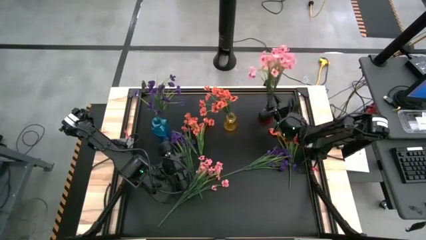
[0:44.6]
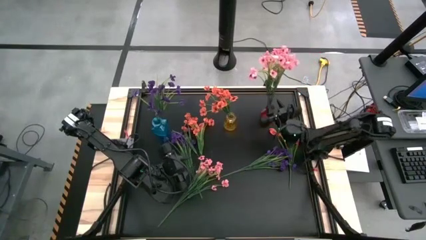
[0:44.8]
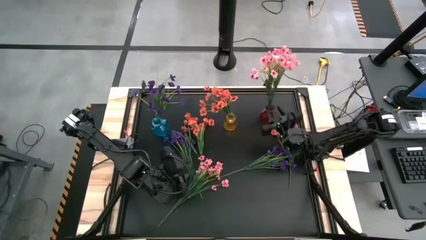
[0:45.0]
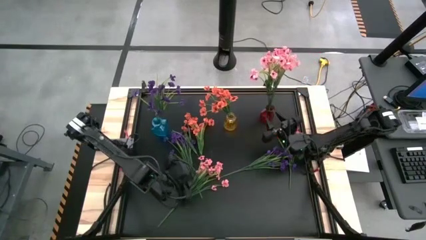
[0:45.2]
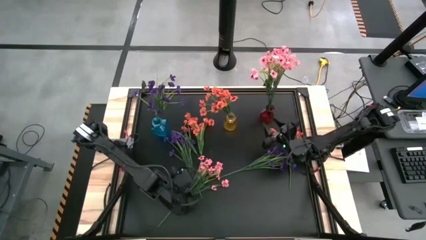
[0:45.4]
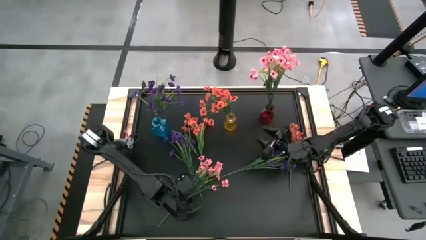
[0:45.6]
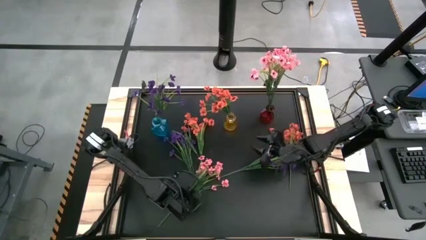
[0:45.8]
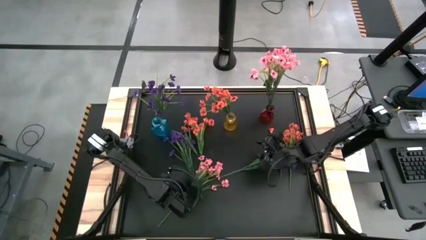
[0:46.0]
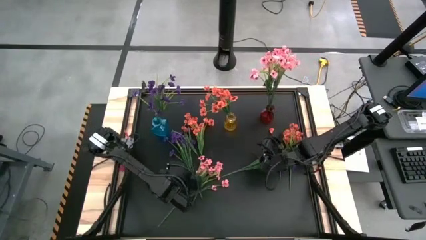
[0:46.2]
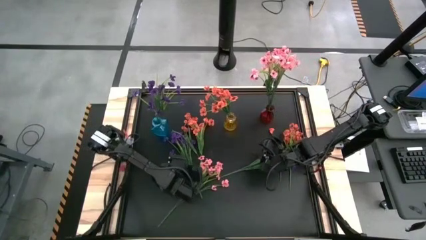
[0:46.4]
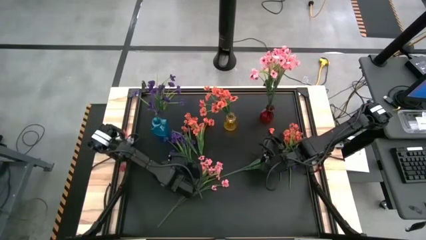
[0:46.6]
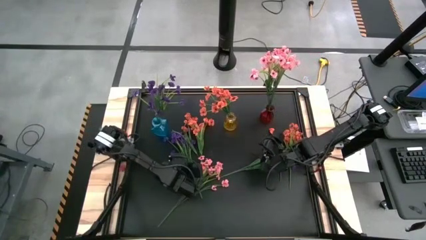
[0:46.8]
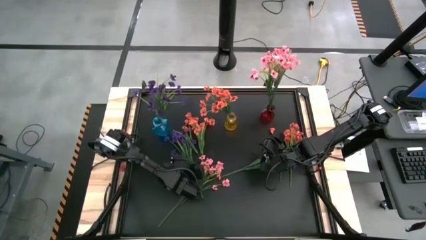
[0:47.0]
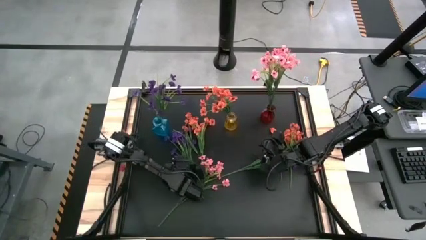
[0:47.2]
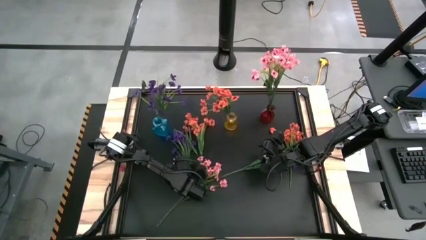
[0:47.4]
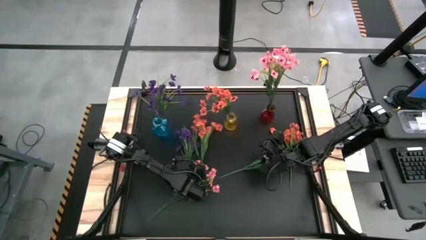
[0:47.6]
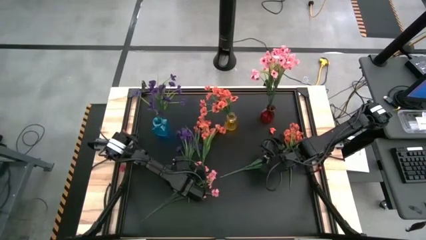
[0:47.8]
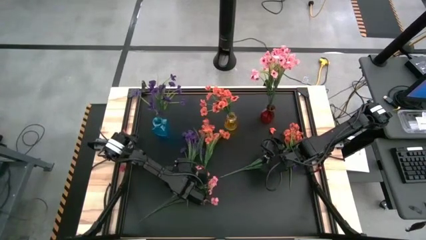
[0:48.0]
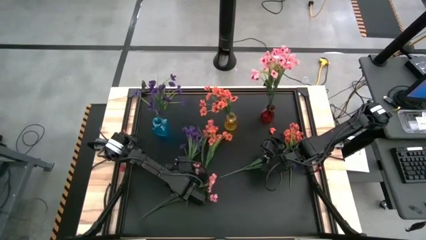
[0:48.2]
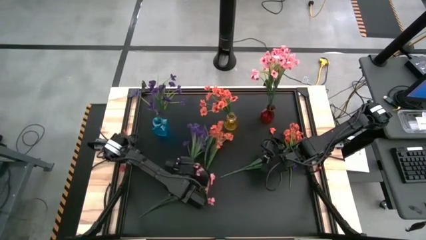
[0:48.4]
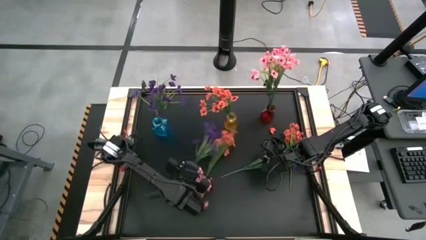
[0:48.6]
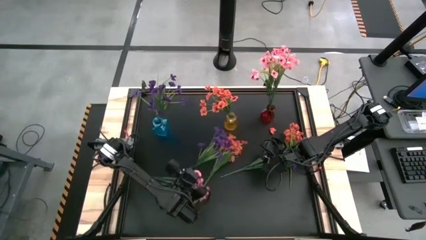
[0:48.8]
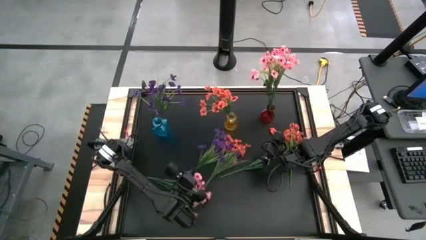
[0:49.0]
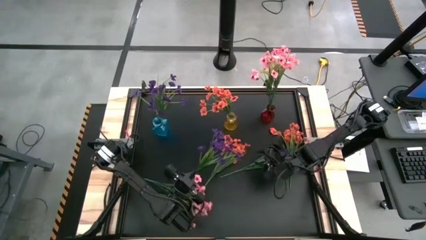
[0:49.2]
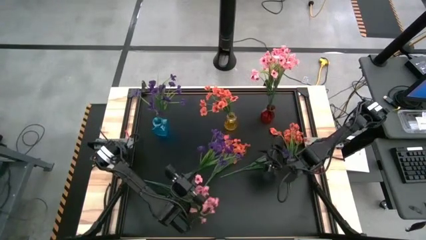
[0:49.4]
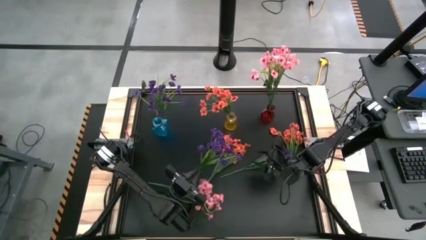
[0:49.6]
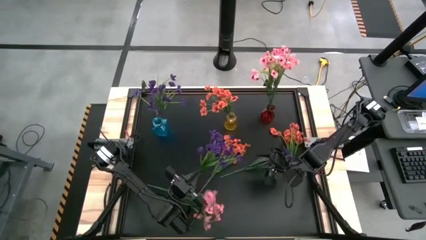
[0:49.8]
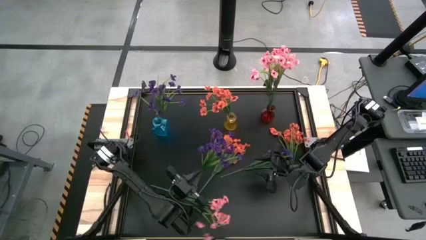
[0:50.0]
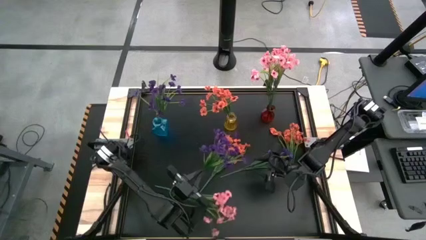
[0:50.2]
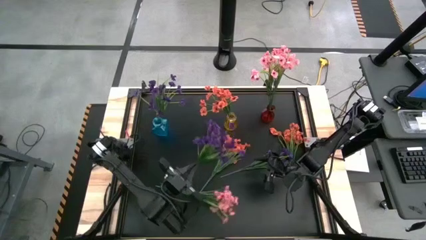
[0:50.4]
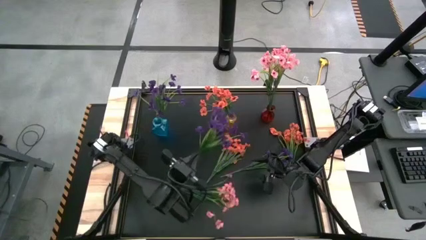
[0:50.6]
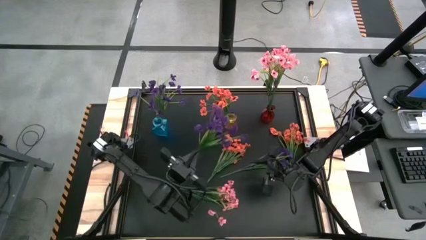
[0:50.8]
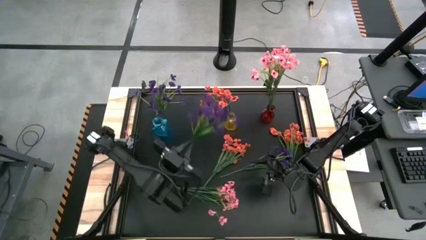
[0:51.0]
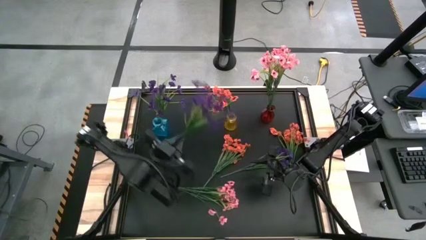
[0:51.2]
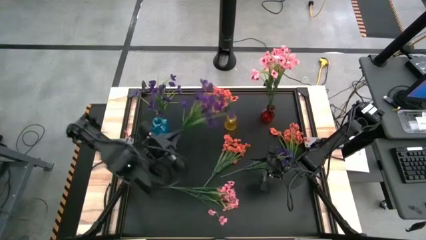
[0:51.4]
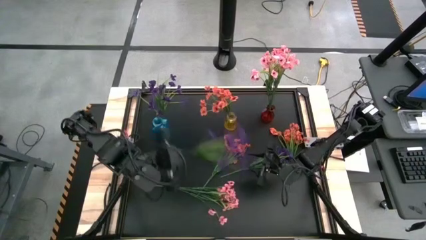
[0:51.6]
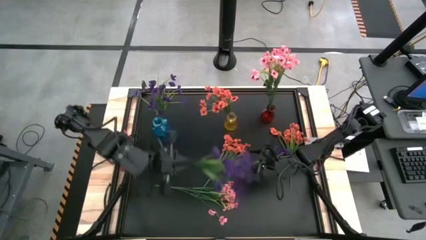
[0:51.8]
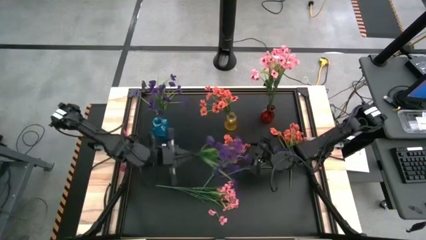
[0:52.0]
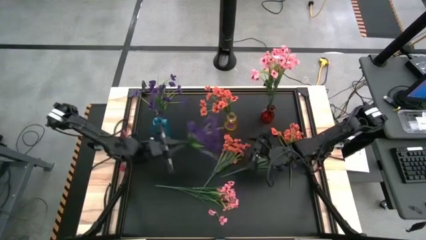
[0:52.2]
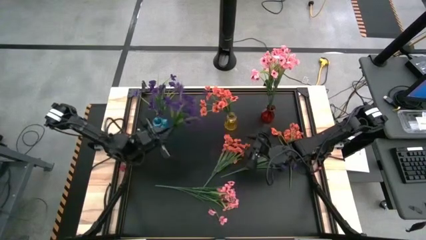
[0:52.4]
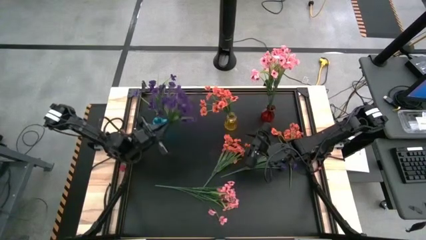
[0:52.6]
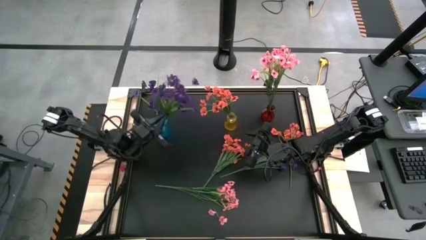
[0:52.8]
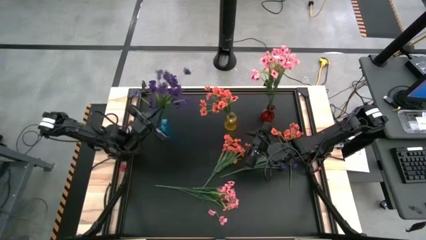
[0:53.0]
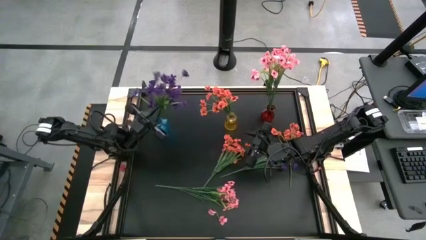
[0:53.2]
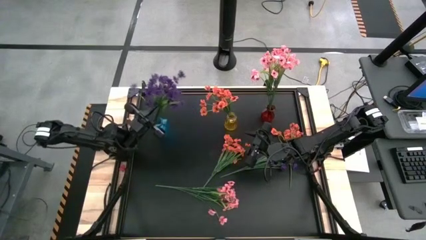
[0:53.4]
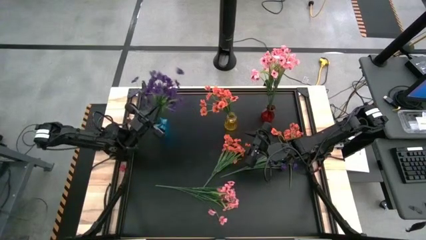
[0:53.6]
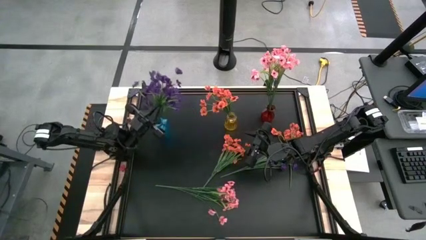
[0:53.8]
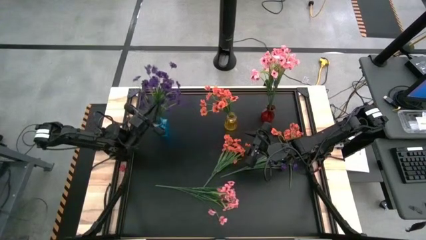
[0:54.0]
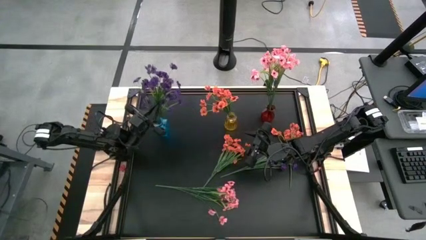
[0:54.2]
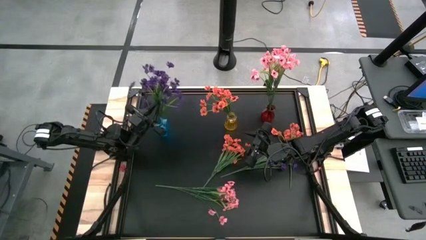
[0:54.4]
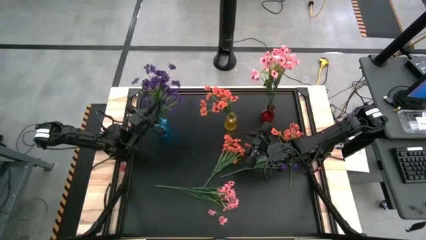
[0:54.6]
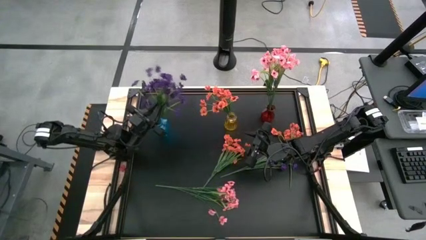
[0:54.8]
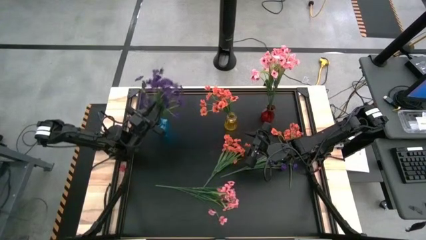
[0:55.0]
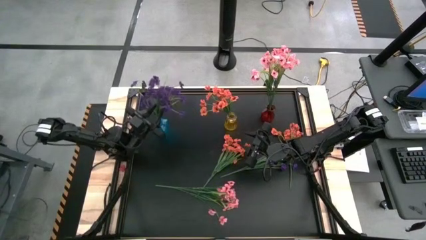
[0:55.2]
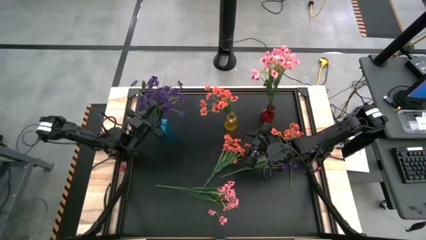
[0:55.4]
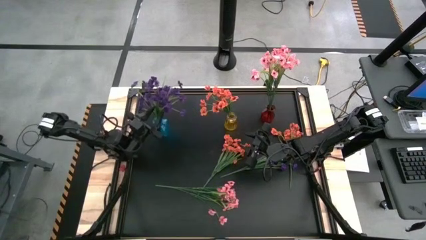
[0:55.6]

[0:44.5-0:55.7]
Task: Sort flowers into vase by color
Put the left violet flowers into the blue flower vase

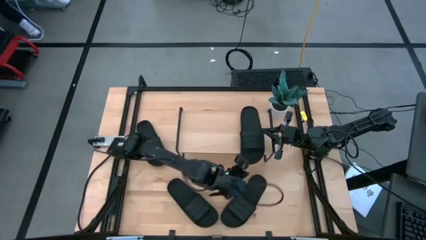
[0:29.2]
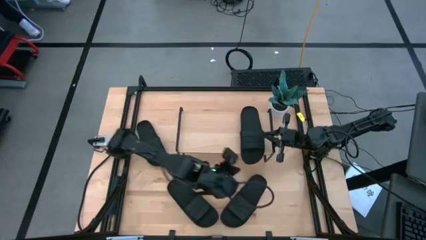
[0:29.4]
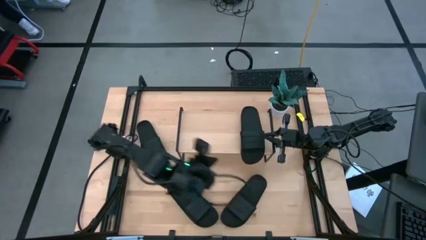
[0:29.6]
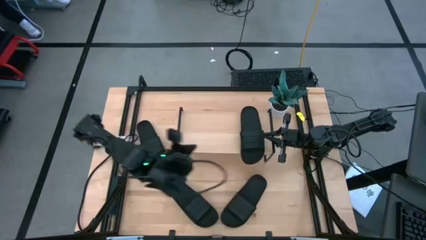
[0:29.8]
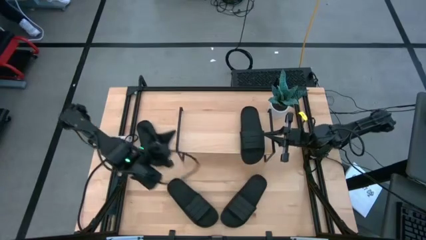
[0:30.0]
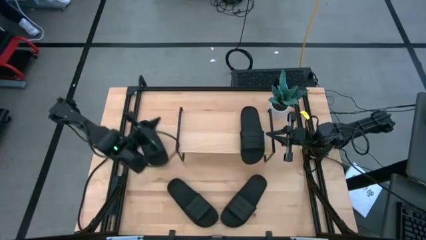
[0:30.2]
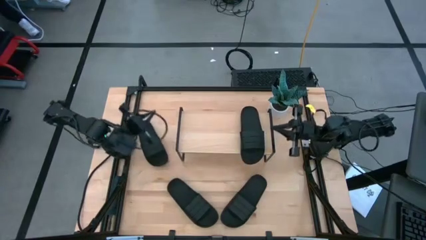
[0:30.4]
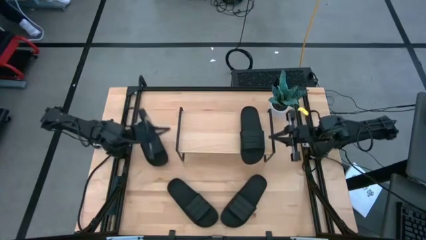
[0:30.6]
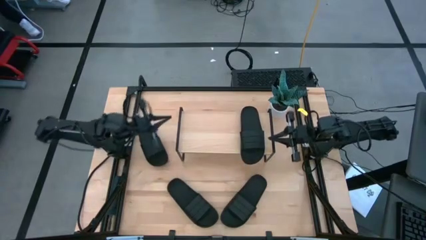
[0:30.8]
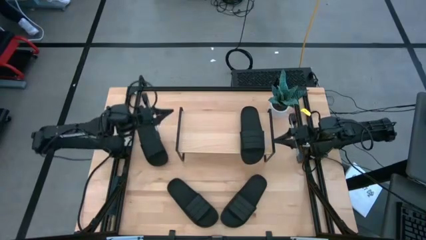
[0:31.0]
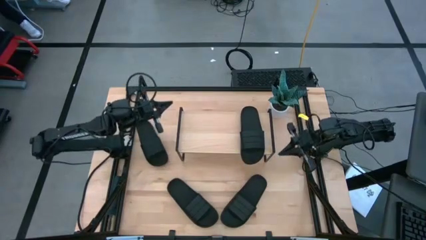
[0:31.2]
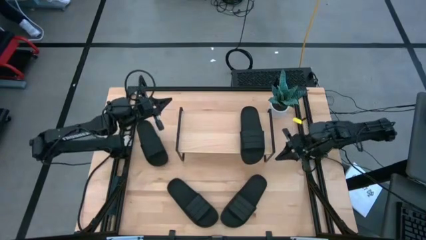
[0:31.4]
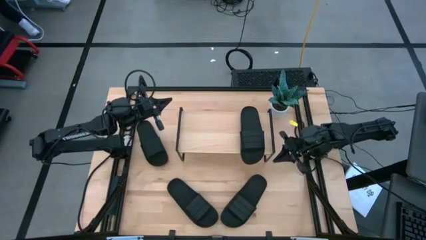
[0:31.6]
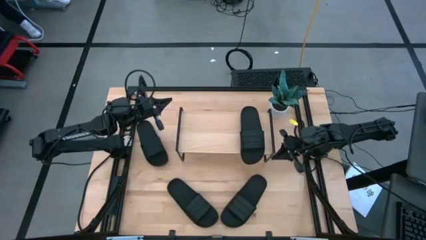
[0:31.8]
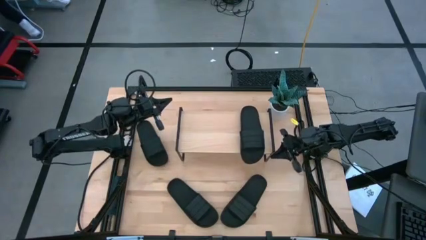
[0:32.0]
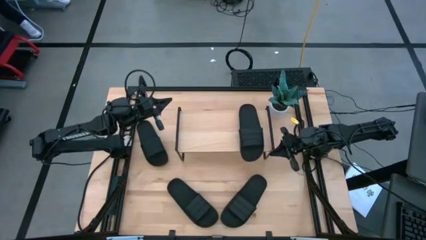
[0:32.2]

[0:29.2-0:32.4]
Task: Pick and place slides into the shelf
Adjust the shelf on the table
